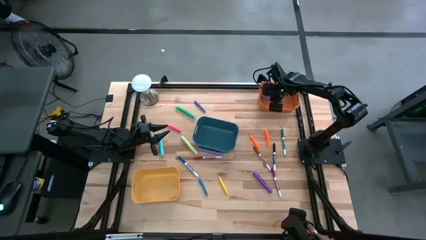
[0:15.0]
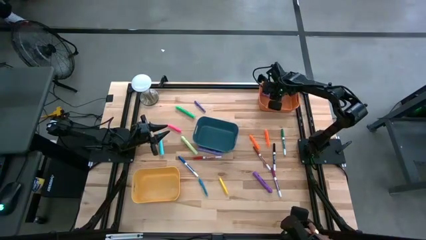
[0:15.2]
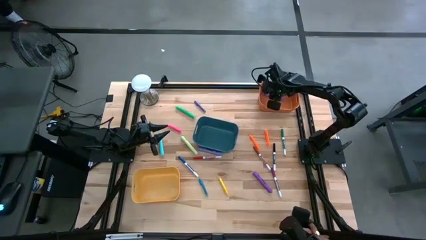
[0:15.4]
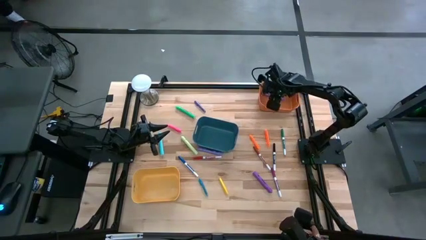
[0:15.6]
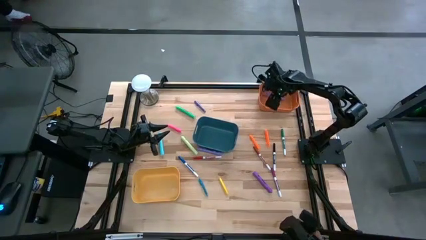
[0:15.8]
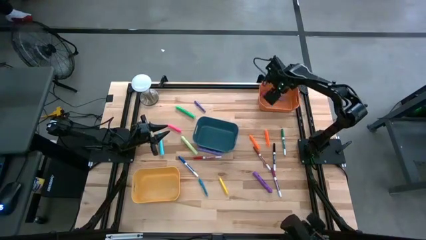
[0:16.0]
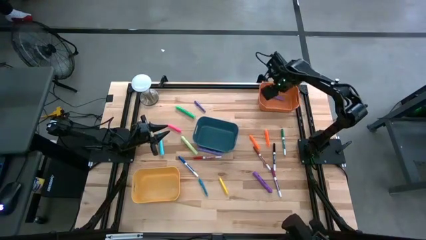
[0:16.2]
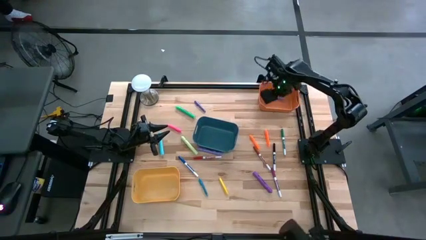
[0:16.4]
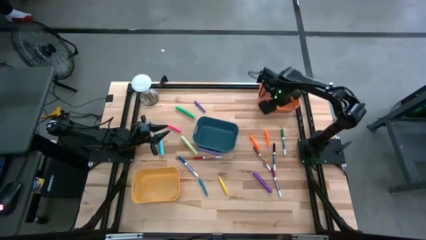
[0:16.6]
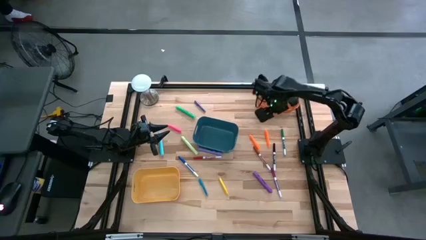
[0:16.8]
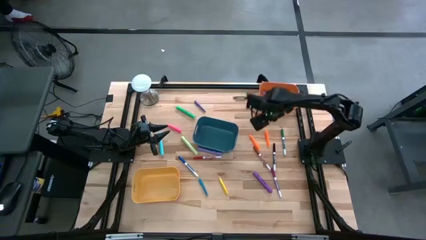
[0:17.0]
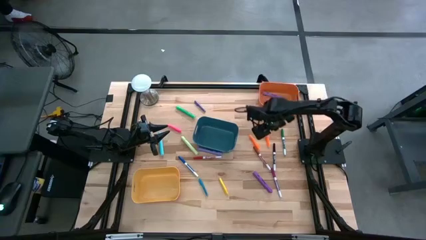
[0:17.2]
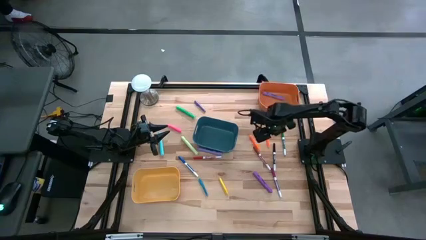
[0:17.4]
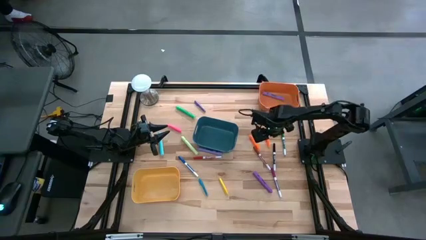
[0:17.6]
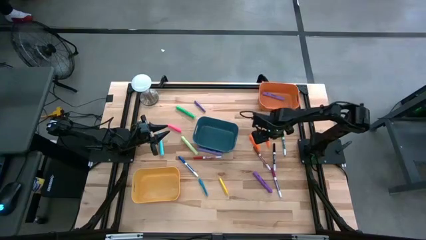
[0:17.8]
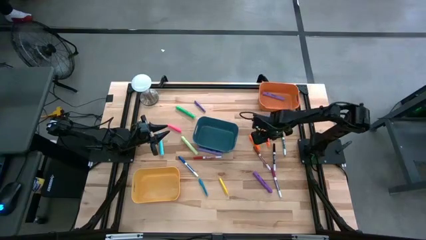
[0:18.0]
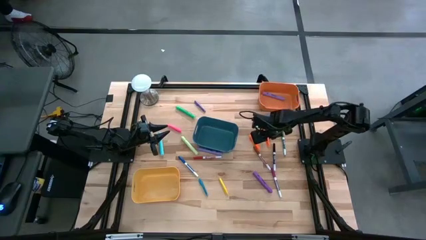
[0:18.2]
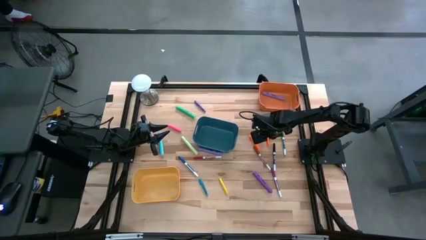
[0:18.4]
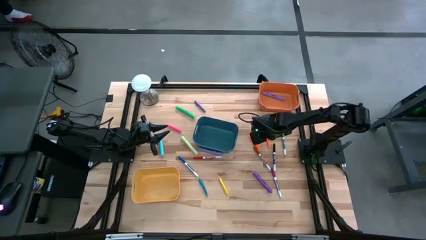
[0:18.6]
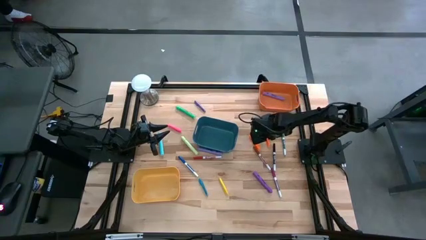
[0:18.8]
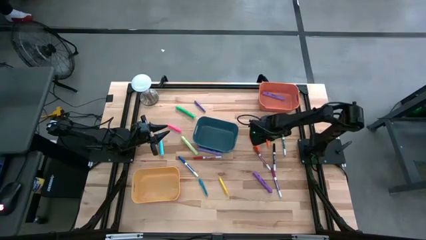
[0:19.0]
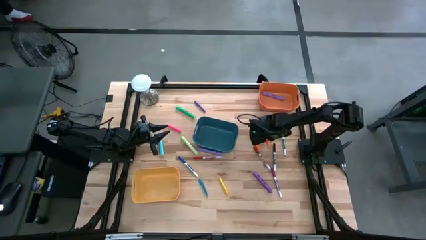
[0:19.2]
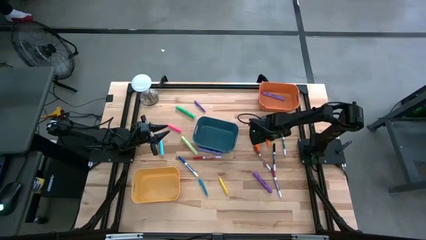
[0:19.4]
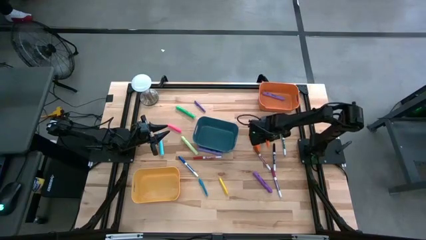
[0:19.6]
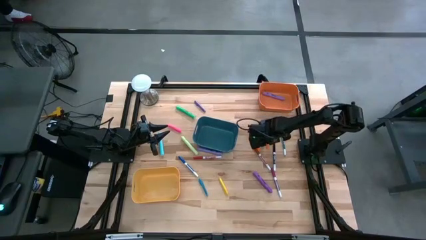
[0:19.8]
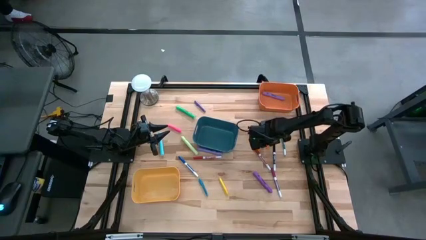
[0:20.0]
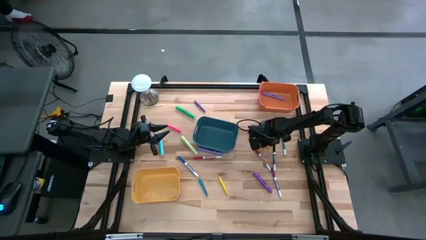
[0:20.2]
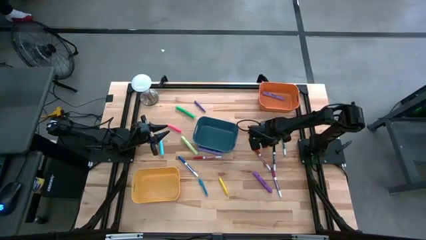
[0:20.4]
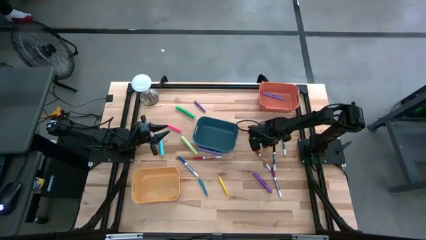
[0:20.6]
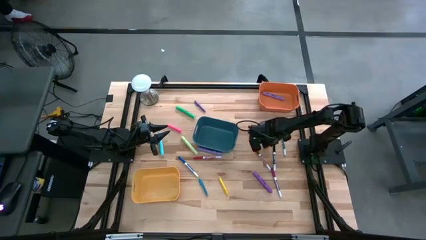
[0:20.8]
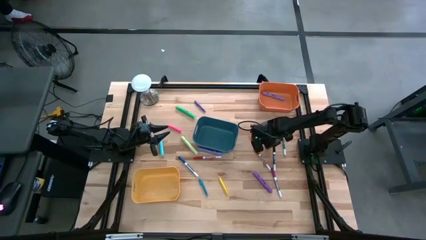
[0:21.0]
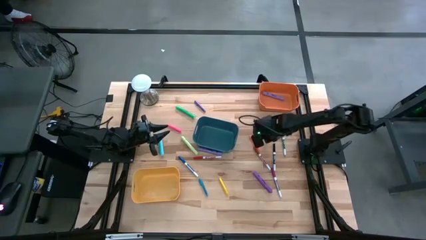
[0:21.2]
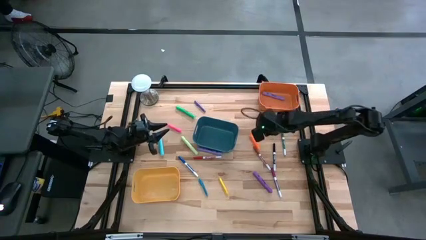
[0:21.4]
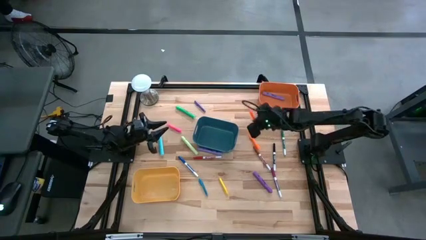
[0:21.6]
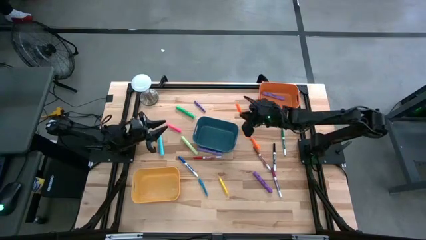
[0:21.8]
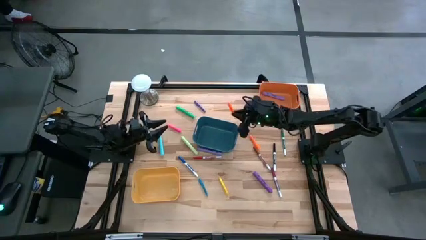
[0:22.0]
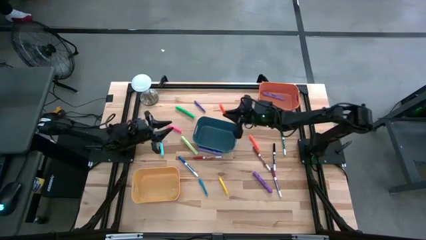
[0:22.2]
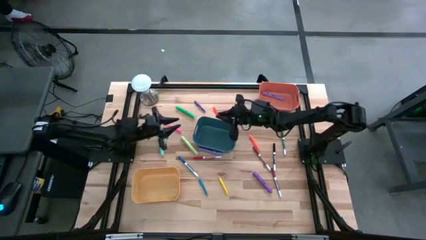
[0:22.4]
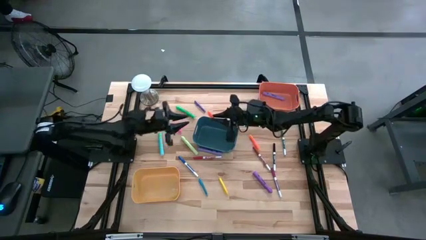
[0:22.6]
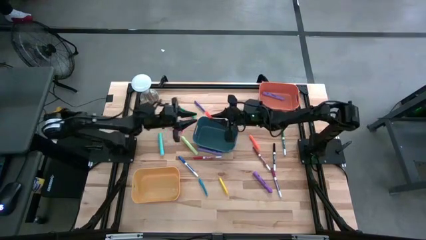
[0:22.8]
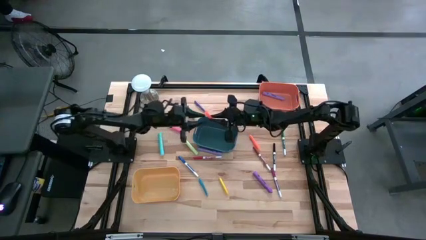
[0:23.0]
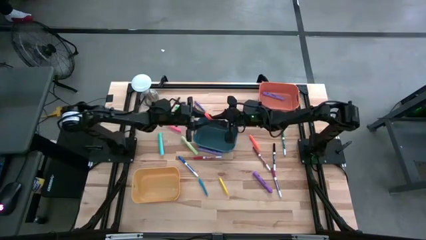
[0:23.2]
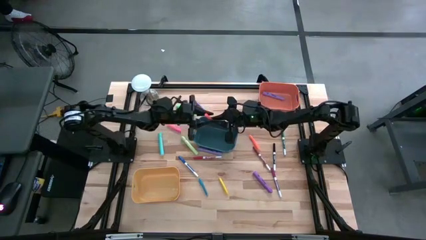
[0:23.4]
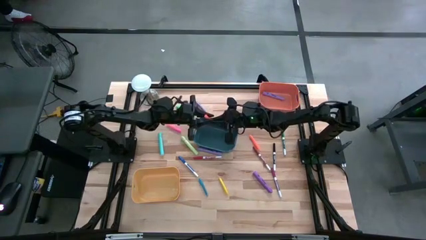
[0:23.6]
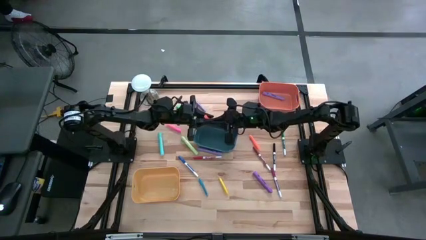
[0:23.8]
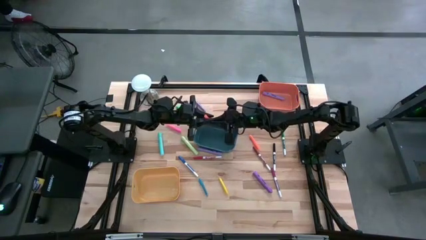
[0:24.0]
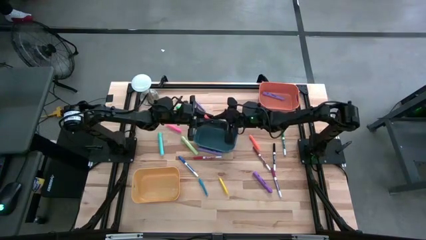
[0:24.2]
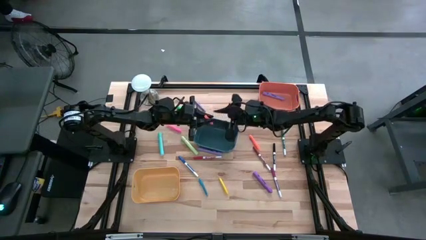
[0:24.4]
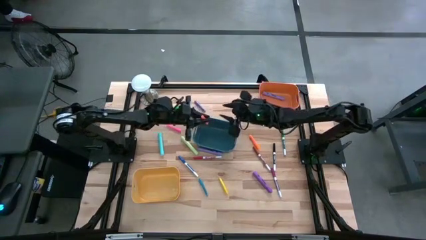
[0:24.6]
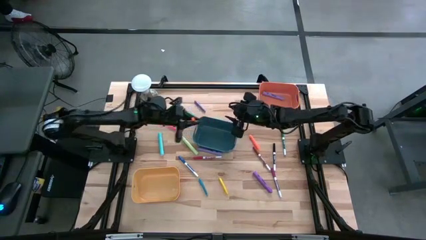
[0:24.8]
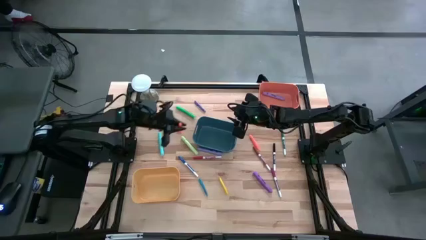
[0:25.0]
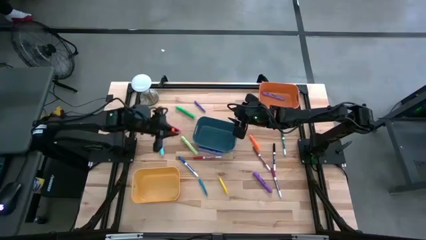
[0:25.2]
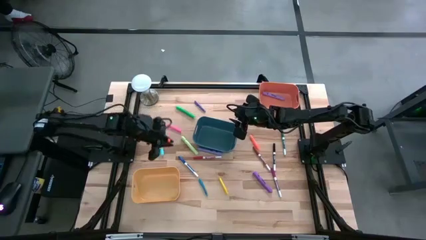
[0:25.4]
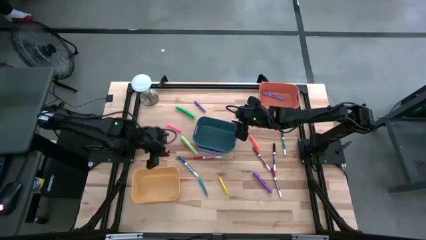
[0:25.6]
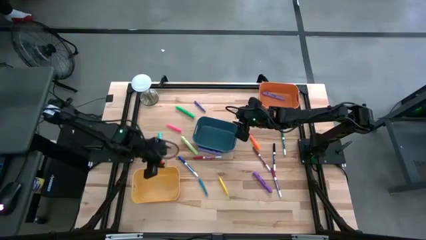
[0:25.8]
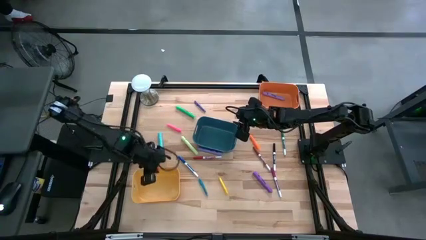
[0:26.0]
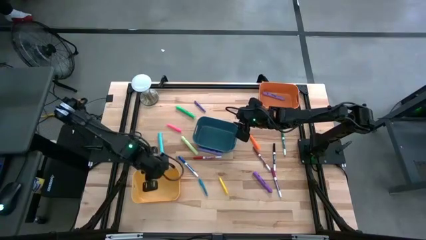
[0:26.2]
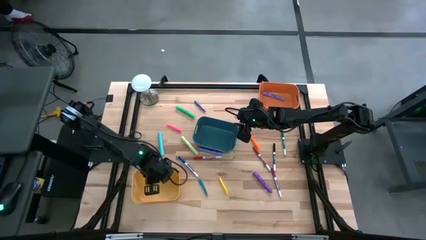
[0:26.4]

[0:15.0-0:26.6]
Task: Pick & Place Markers
Put the right orange pen into the yellow bin
